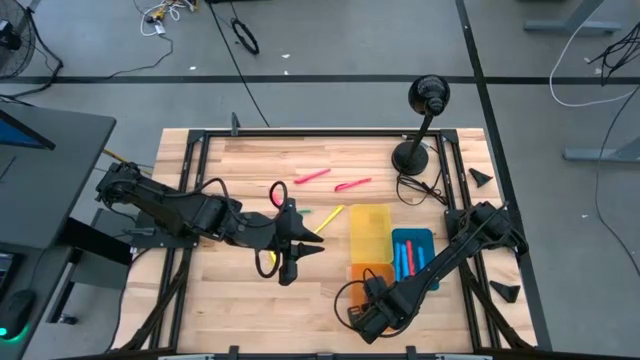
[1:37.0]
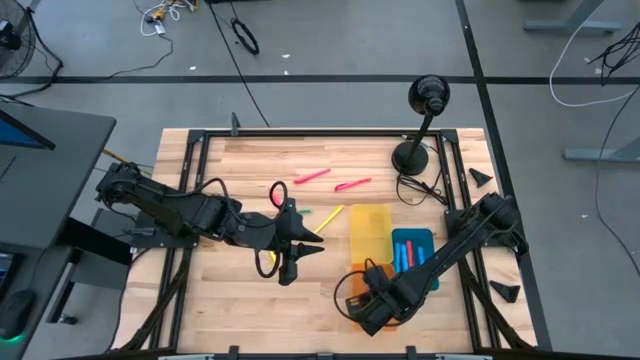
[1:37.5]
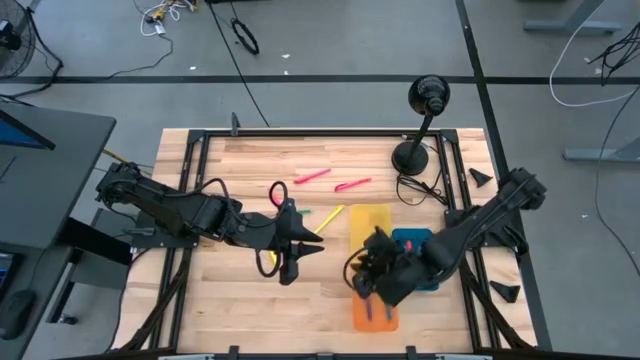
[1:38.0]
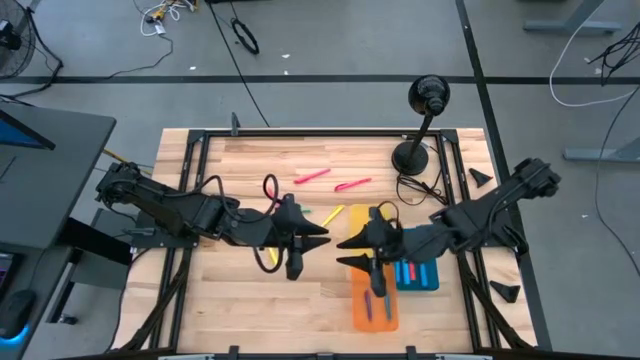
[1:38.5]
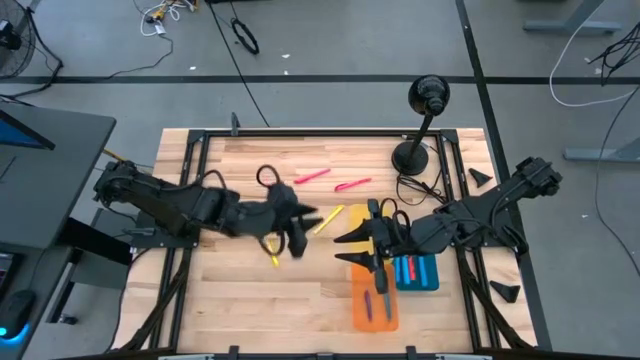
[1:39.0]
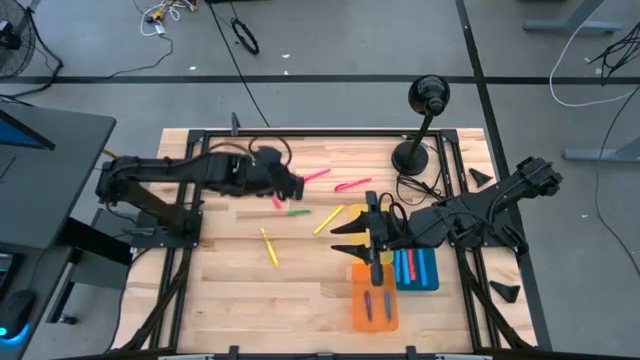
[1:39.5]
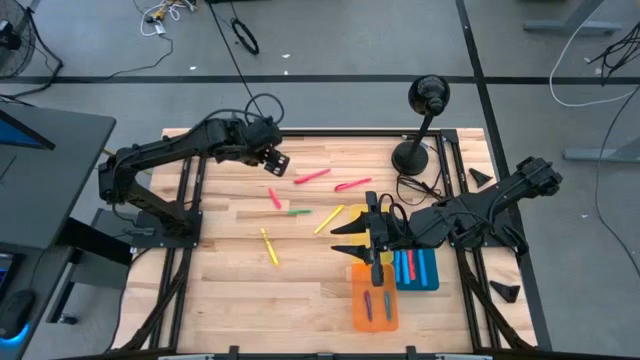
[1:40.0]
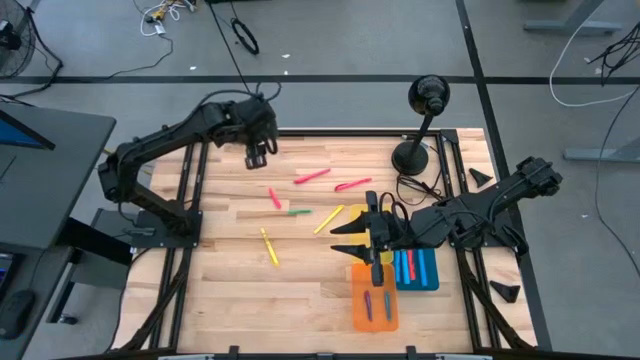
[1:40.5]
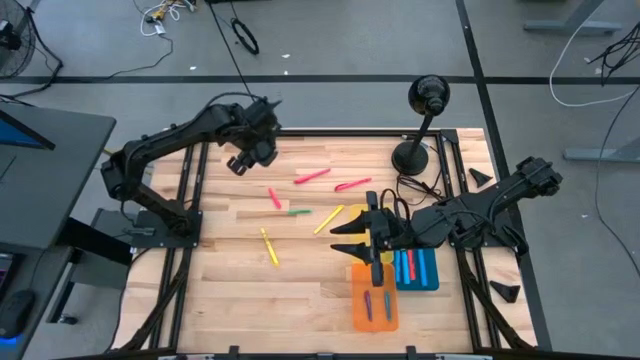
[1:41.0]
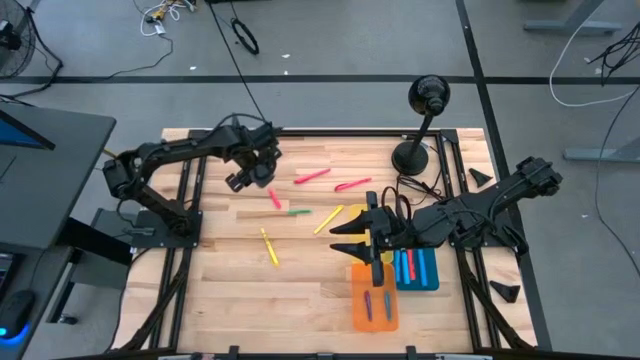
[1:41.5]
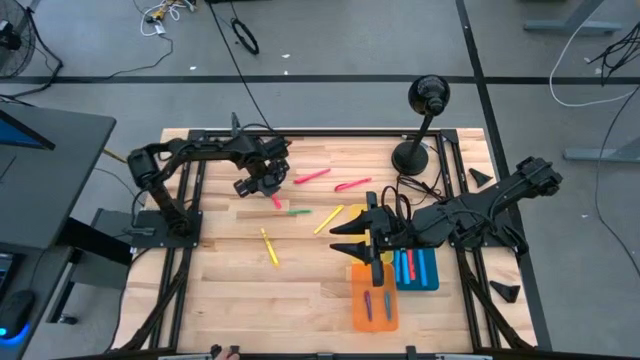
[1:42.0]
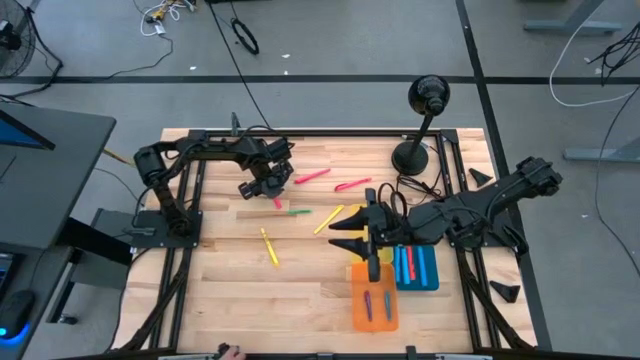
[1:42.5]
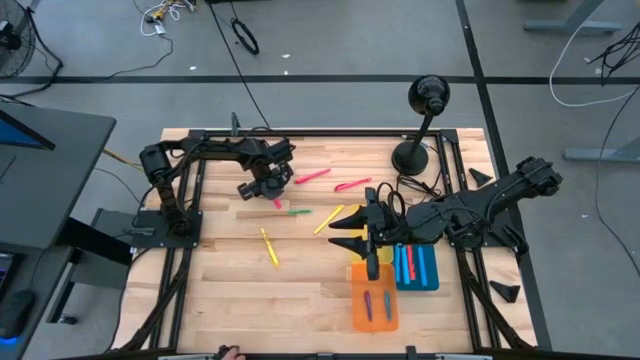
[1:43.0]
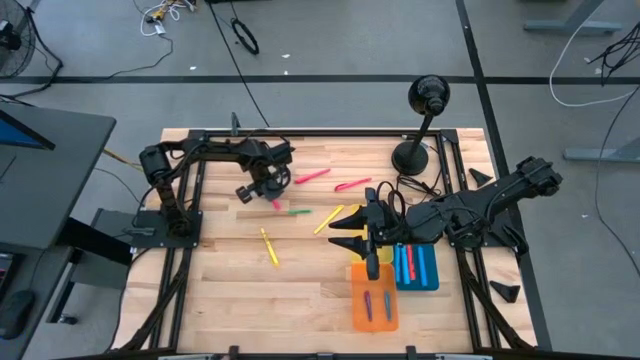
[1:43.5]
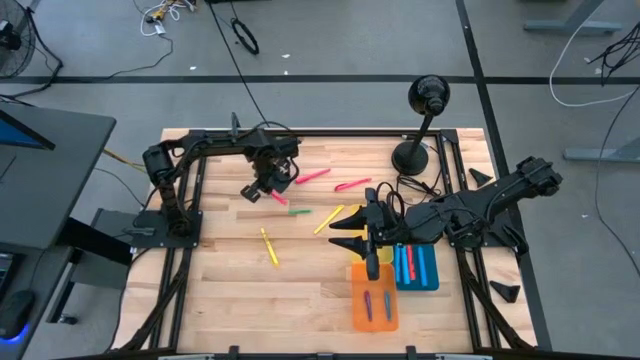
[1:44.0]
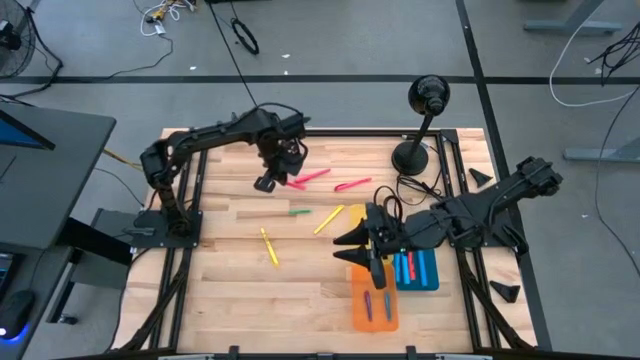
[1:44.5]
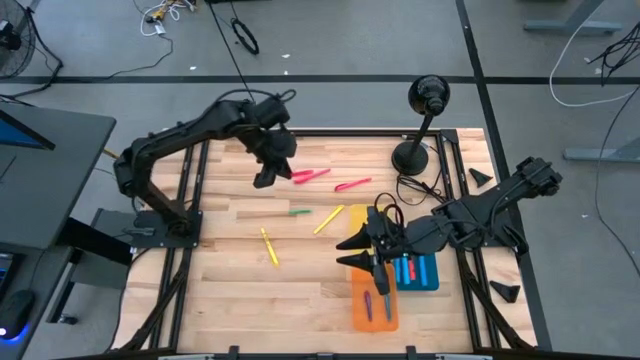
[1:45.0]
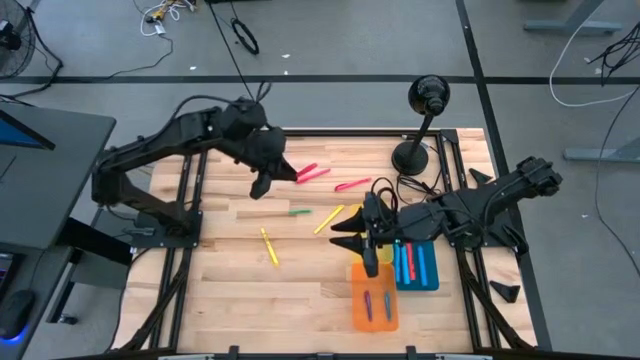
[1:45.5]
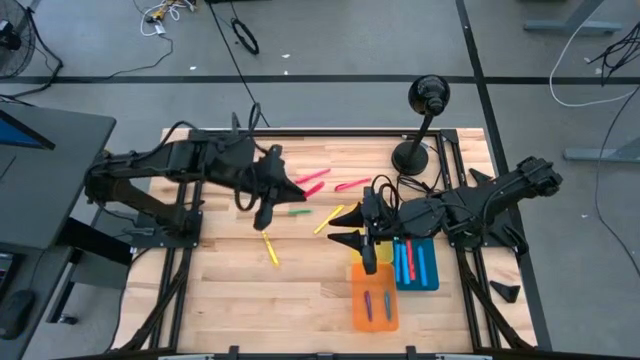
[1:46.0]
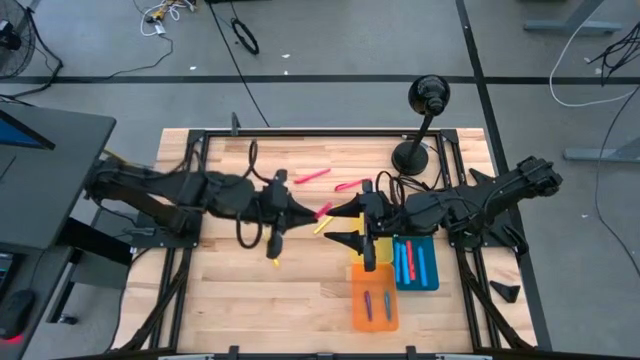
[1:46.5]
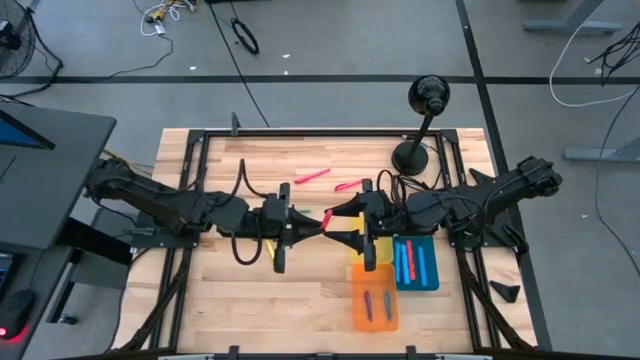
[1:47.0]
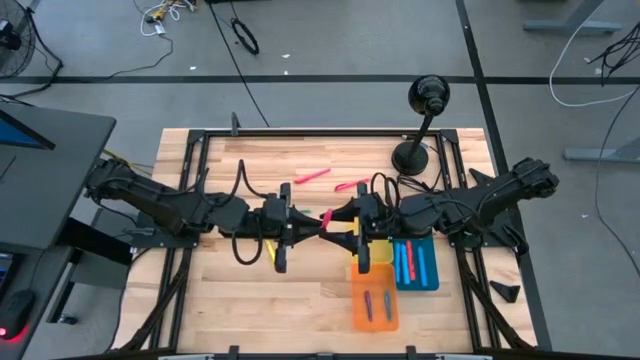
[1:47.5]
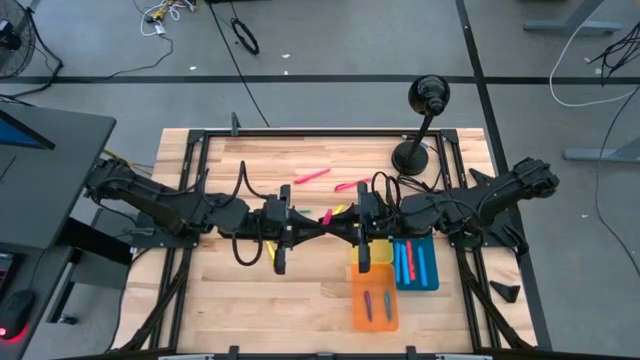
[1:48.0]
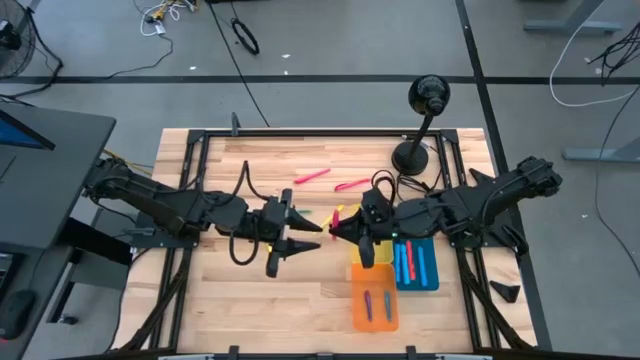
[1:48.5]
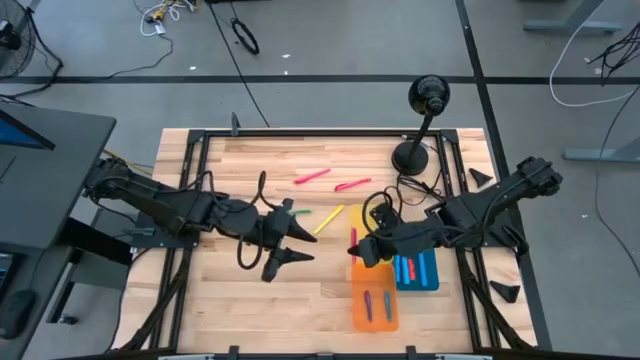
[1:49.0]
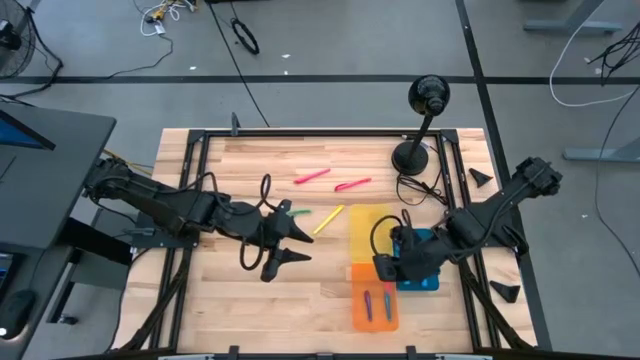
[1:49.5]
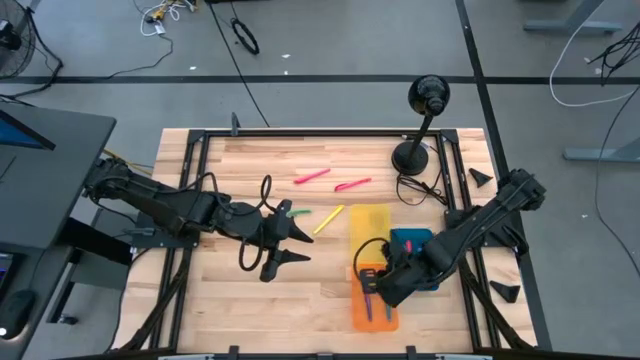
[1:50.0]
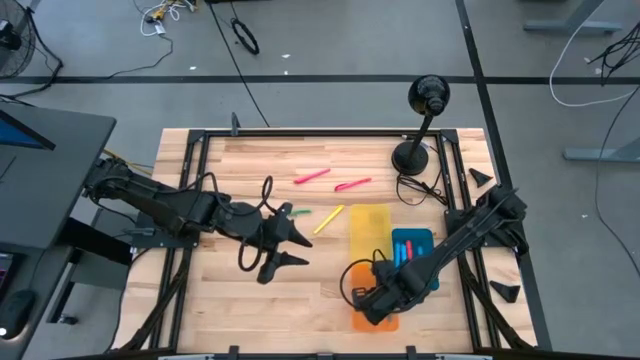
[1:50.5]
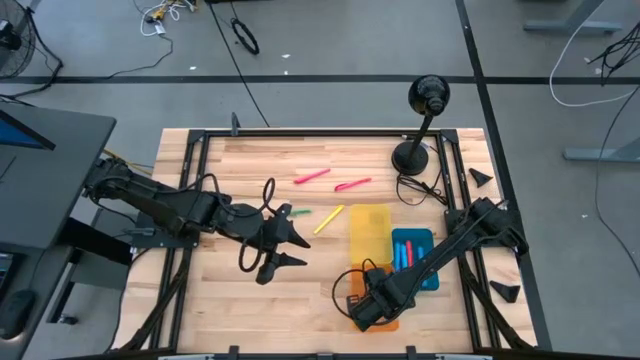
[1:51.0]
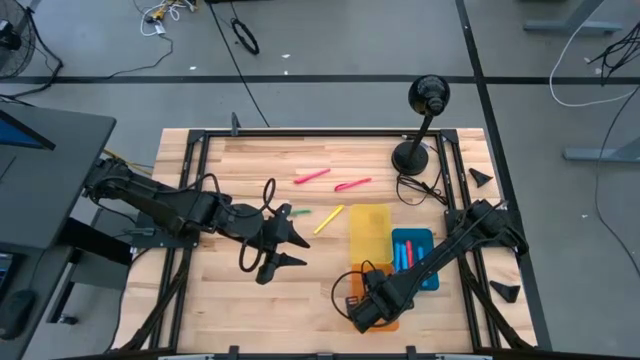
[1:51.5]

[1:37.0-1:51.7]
Task: Pick & Place Markers
Put the left pink pen into the orange bin

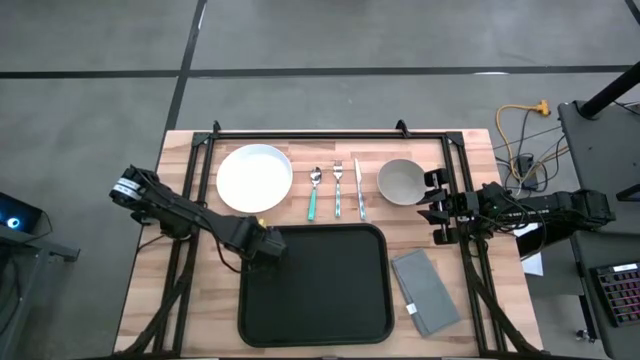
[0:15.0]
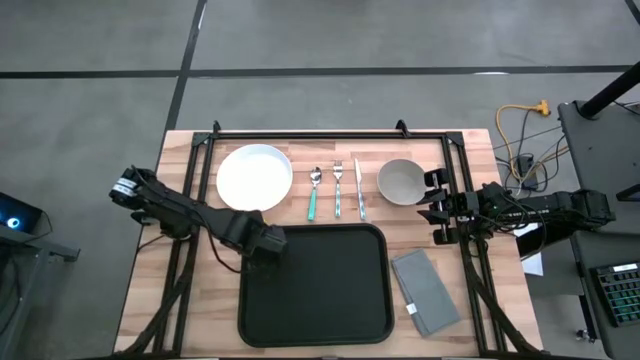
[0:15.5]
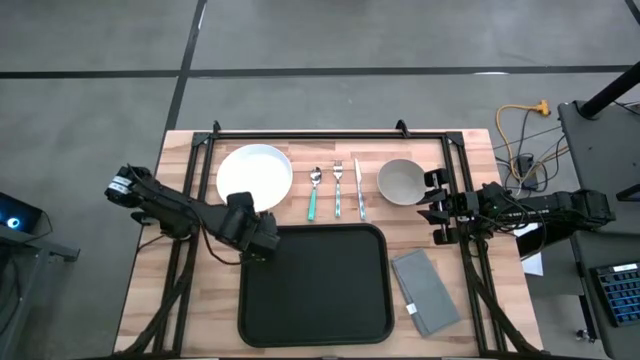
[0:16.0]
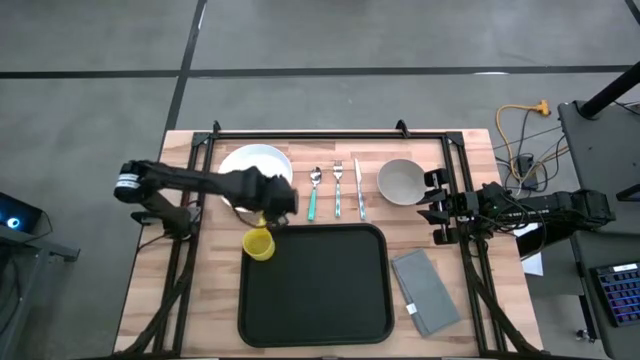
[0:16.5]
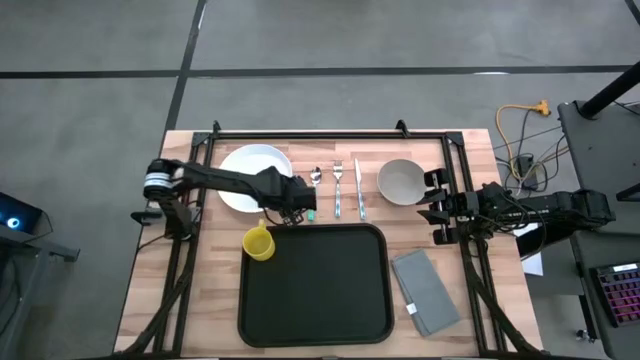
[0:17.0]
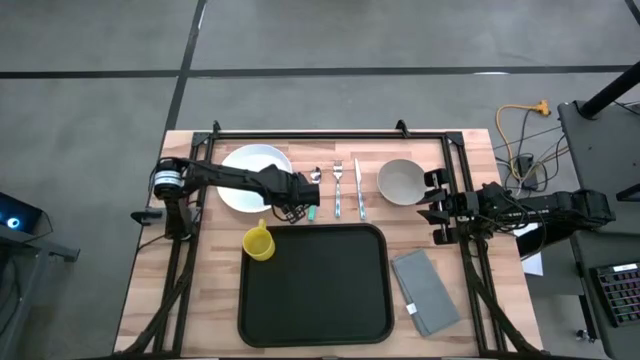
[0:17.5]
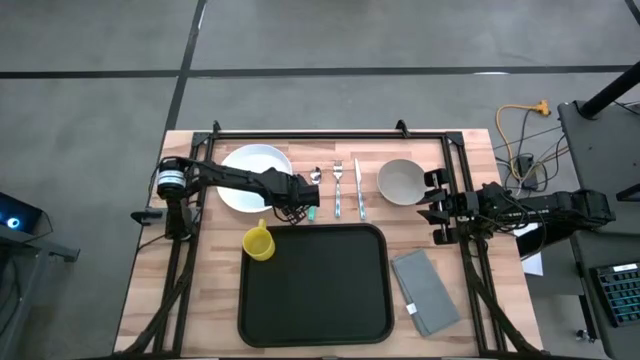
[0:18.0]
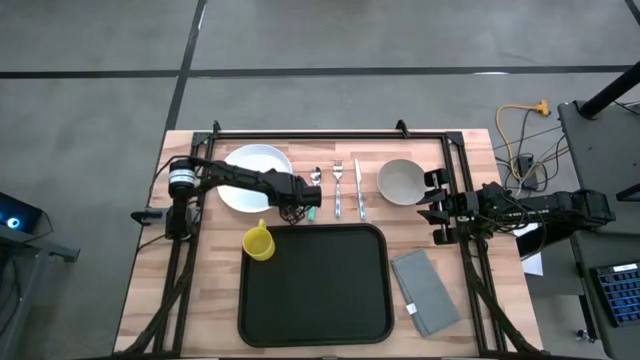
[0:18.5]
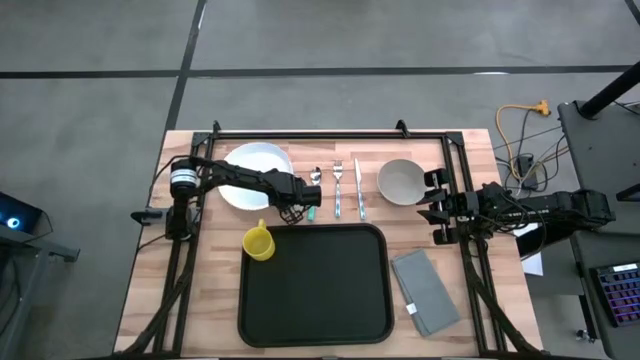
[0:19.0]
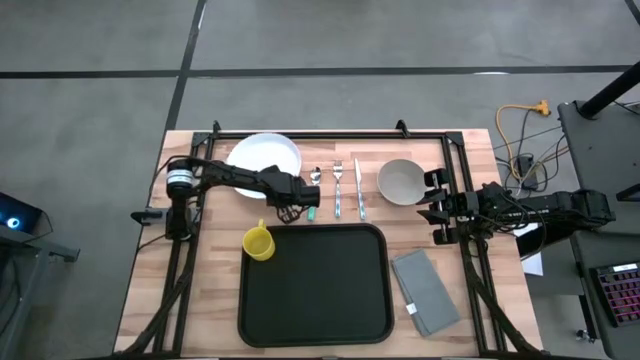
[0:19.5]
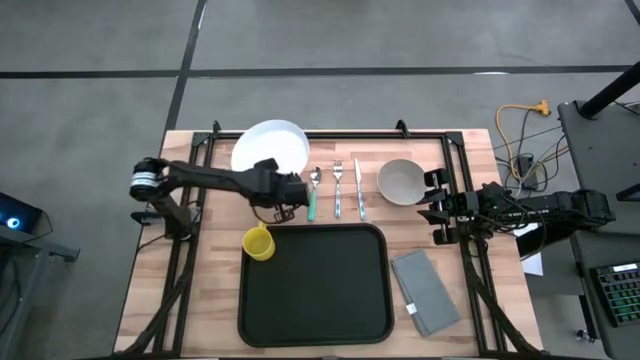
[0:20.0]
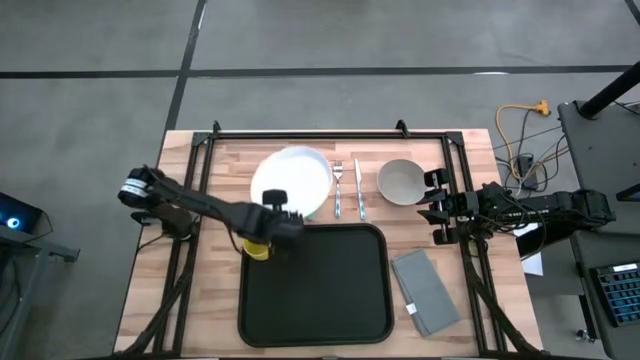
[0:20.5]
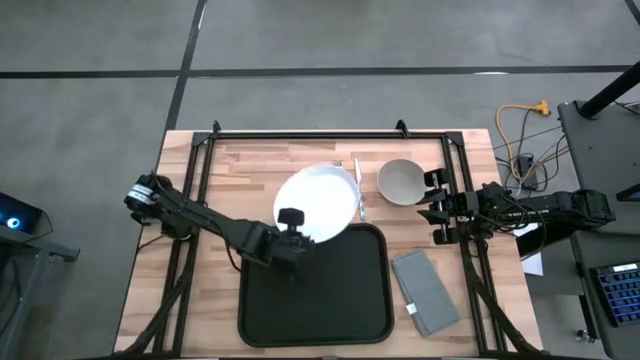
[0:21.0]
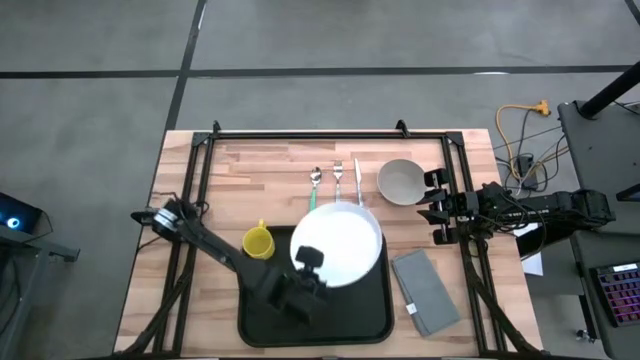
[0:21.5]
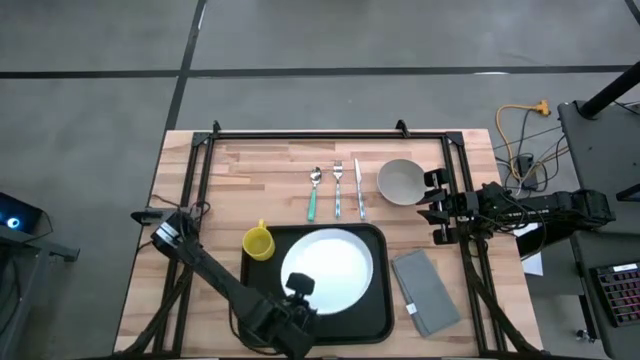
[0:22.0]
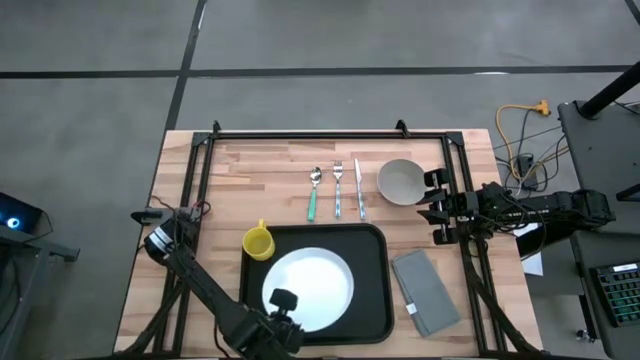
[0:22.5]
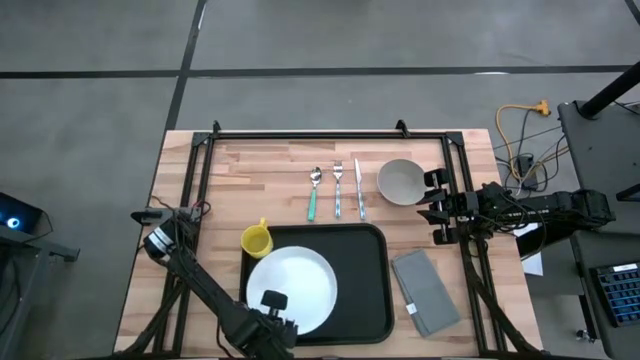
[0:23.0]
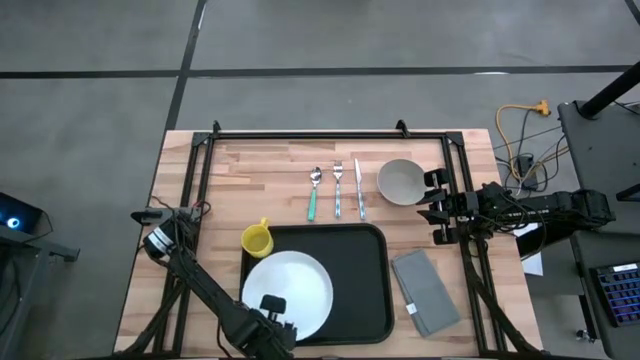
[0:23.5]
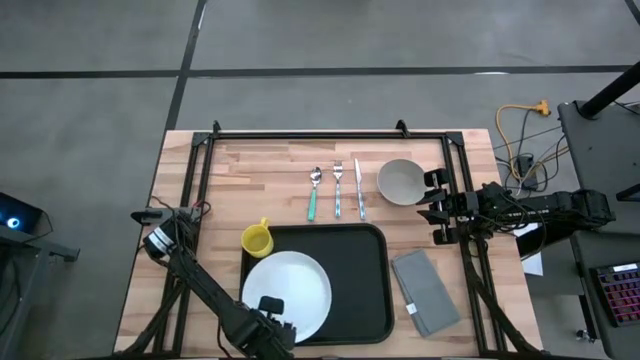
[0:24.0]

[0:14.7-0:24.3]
Task: Set up tray
Put the white plate on the black serving tray to the bottom right of the yellow cup
